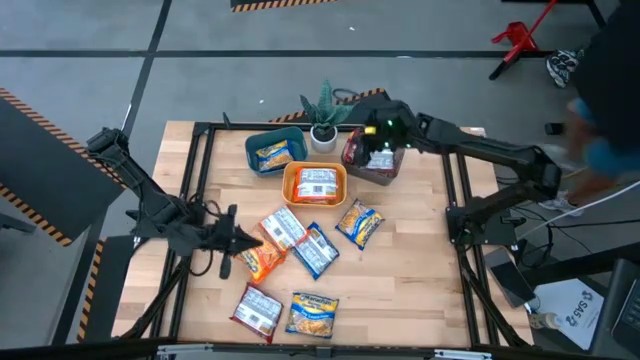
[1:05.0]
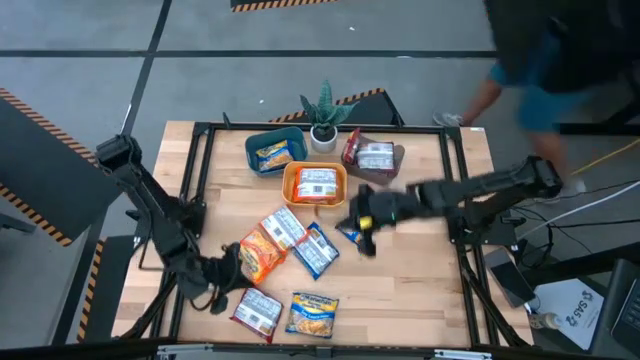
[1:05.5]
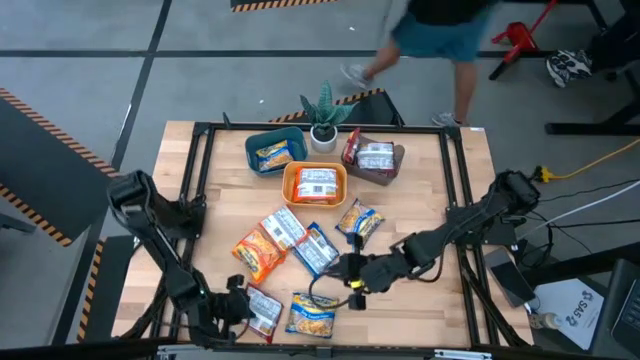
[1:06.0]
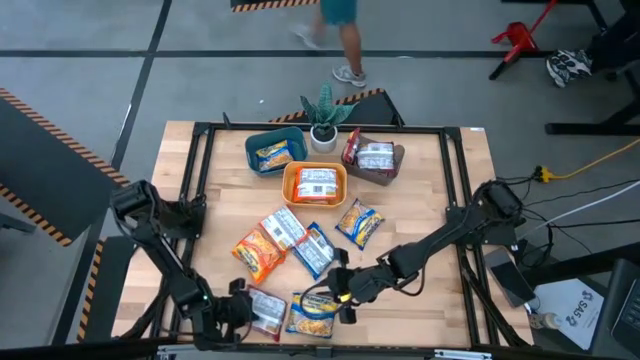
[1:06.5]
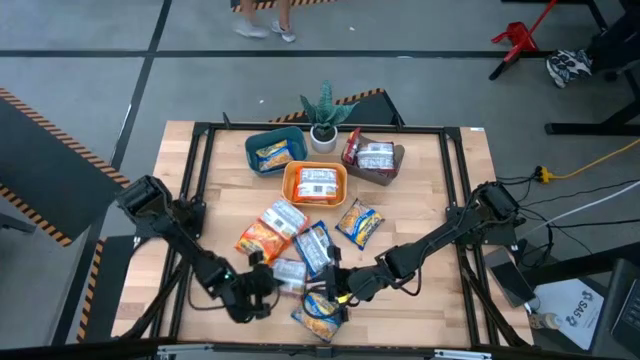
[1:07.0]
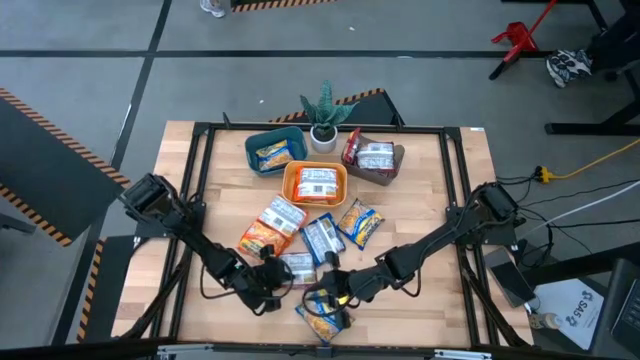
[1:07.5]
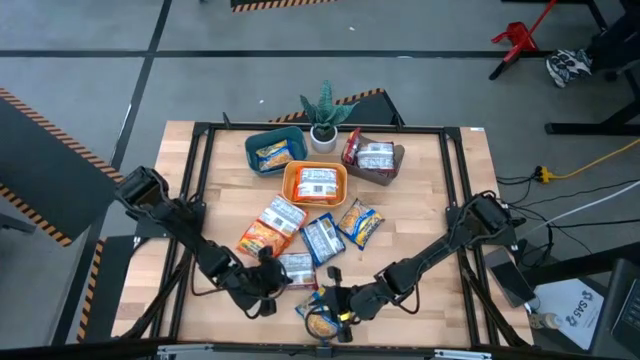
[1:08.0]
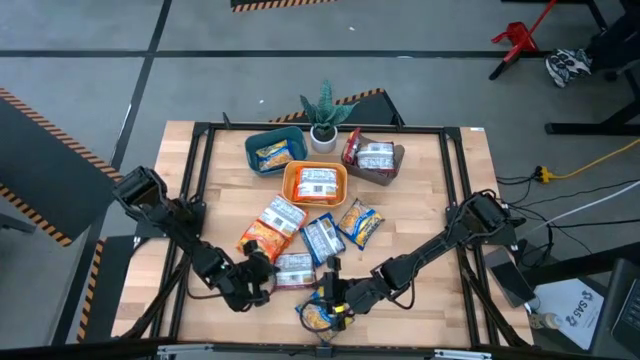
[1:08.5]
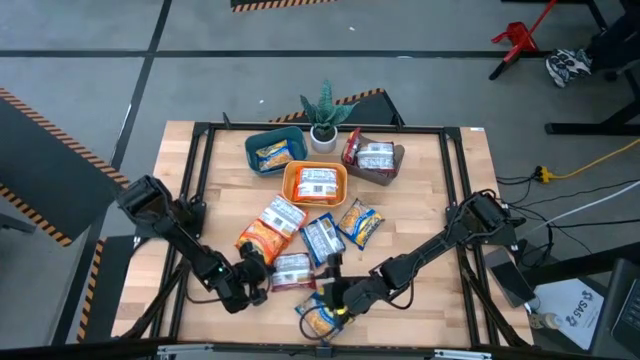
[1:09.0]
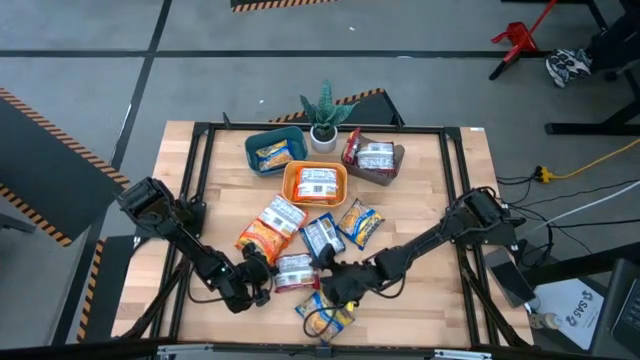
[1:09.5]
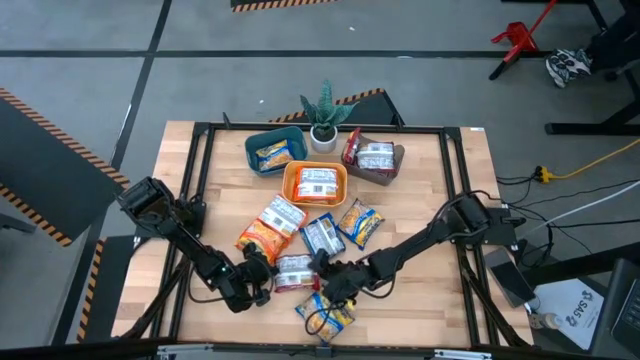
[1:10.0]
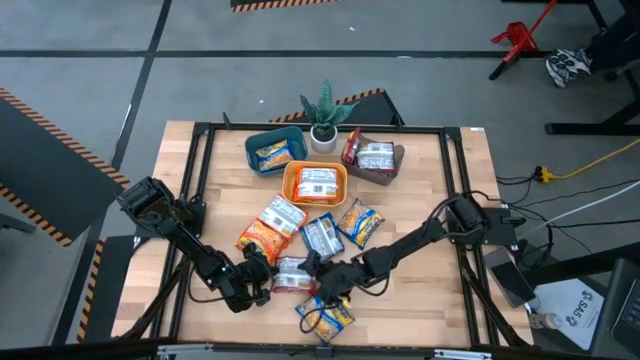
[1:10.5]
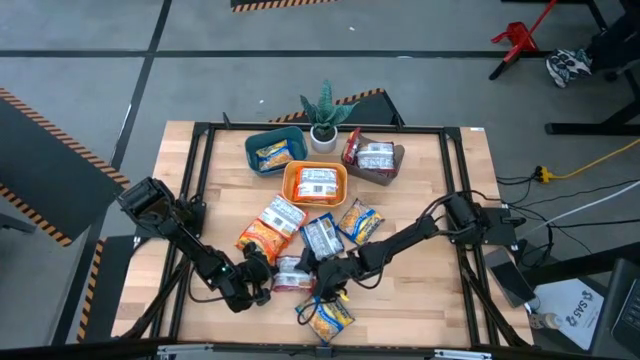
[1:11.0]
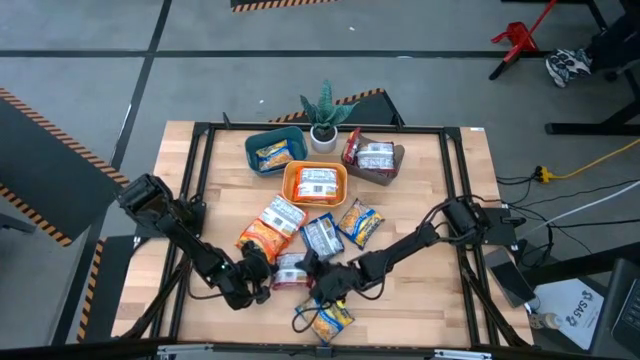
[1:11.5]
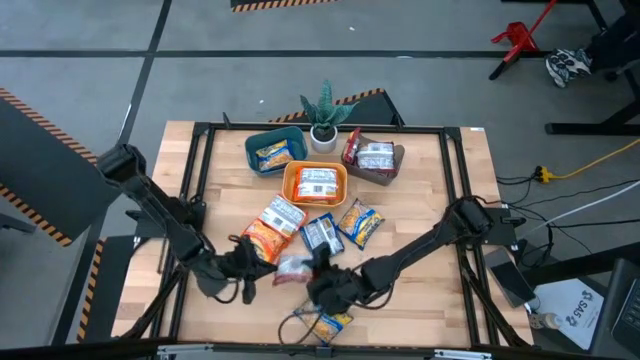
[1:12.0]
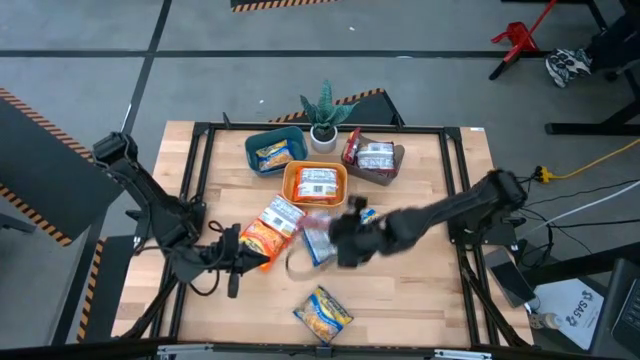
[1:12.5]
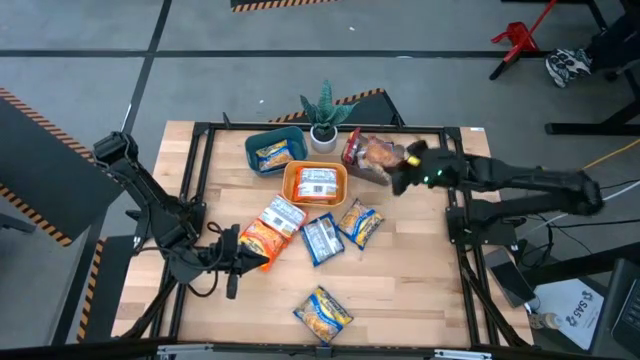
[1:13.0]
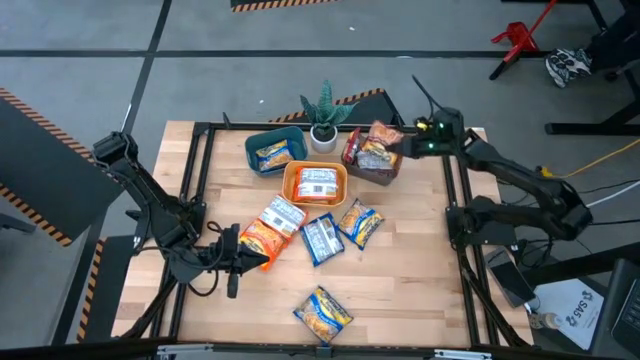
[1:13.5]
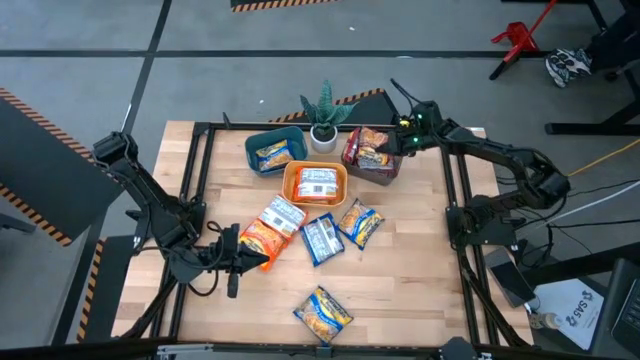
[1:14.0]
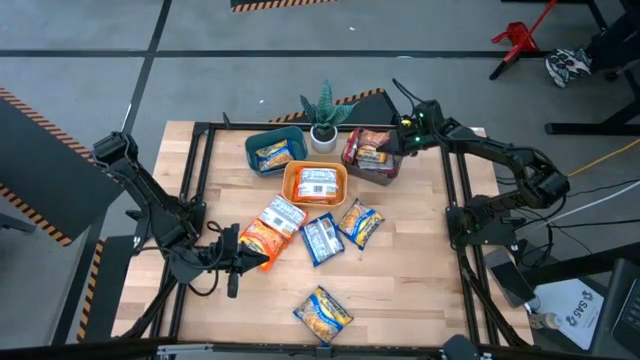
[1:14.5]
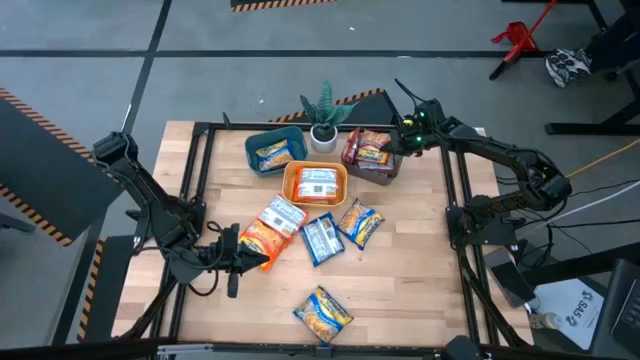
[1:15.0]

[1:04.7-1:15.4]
Task: Sort Maruchan noodles
Put the red noodle pack into the black bin

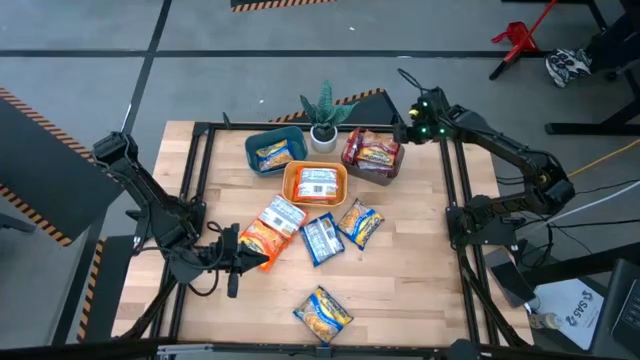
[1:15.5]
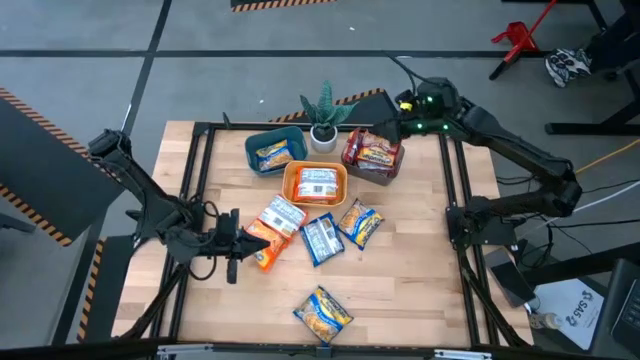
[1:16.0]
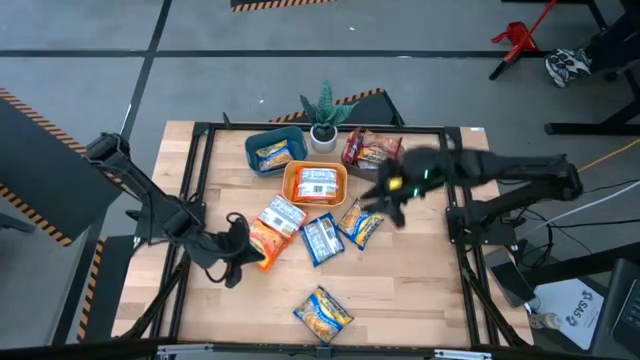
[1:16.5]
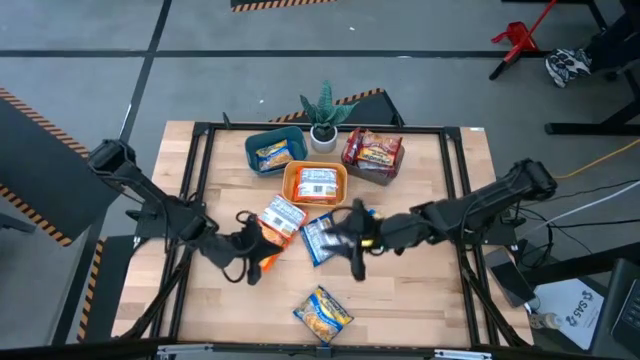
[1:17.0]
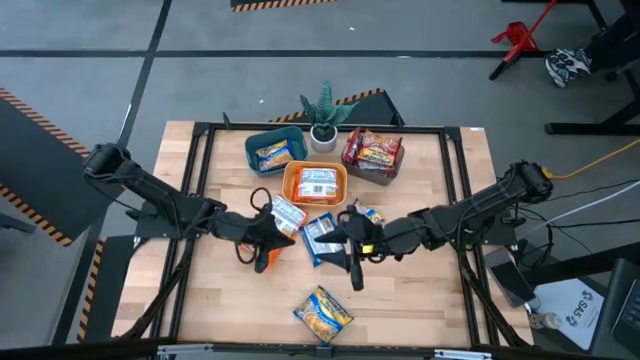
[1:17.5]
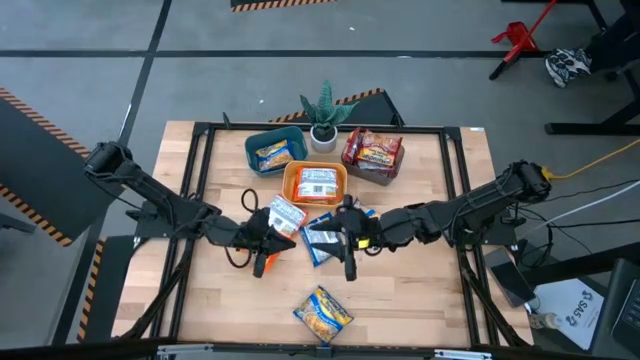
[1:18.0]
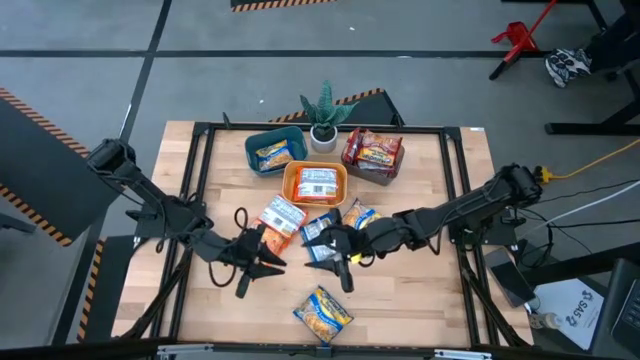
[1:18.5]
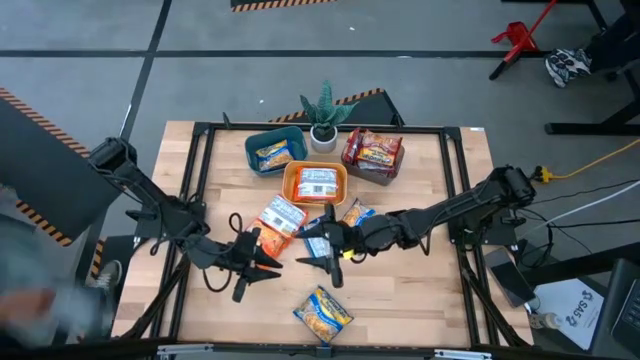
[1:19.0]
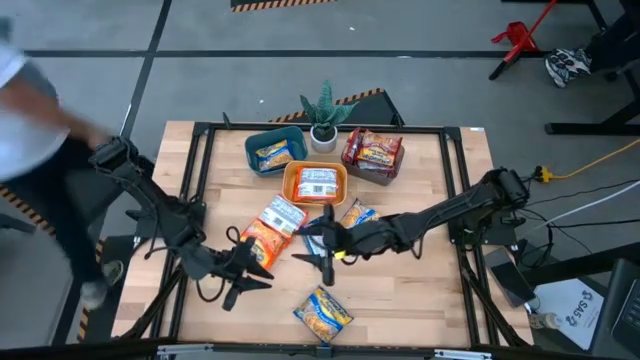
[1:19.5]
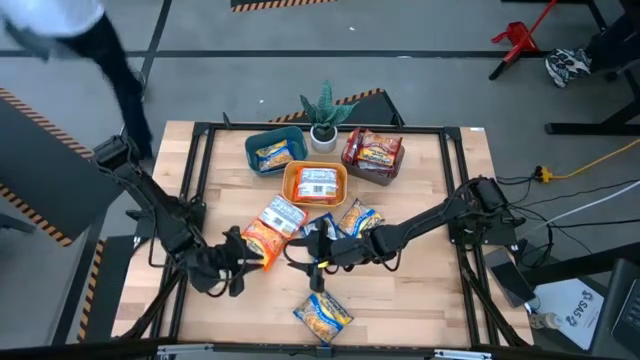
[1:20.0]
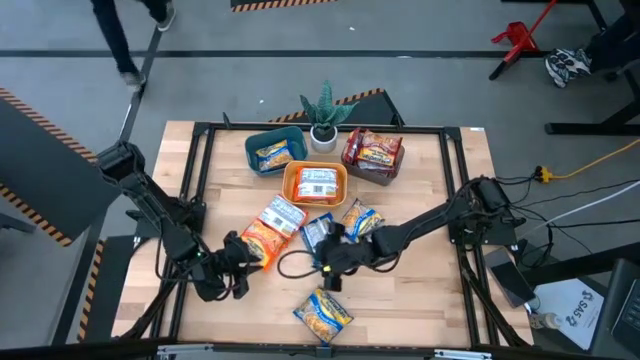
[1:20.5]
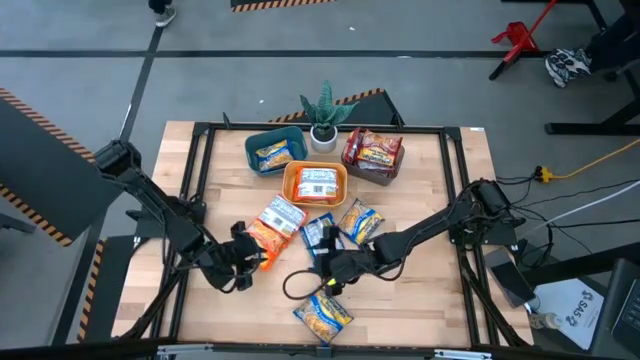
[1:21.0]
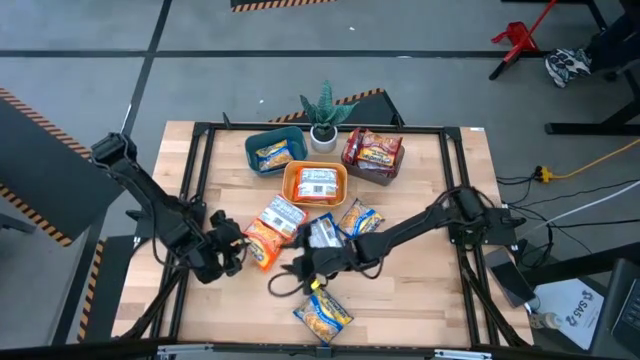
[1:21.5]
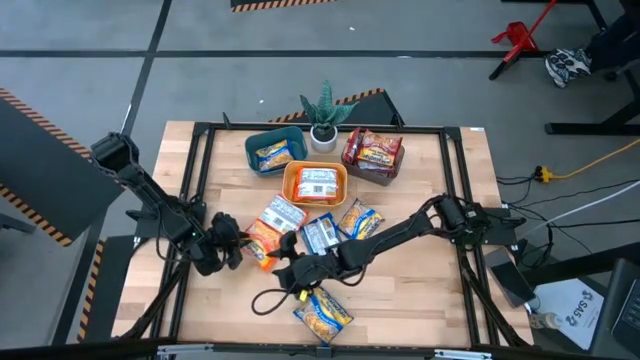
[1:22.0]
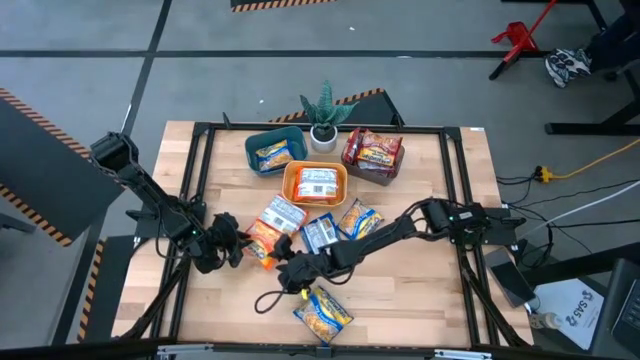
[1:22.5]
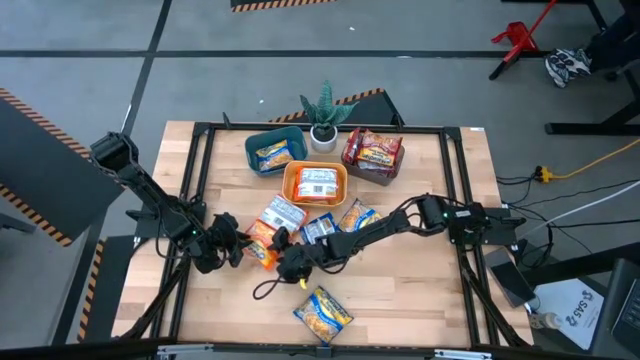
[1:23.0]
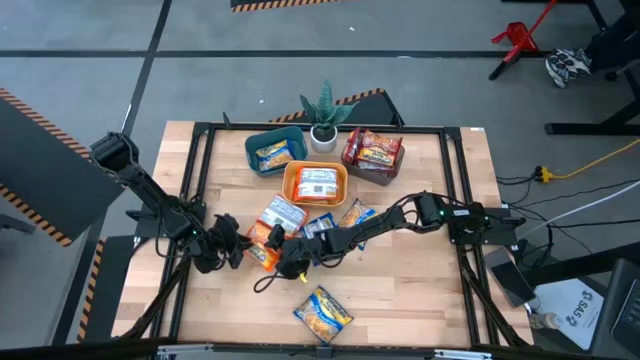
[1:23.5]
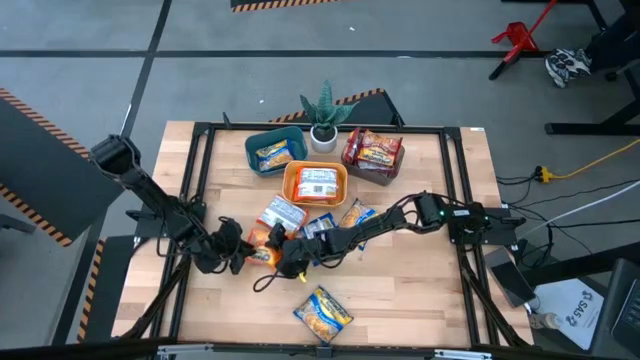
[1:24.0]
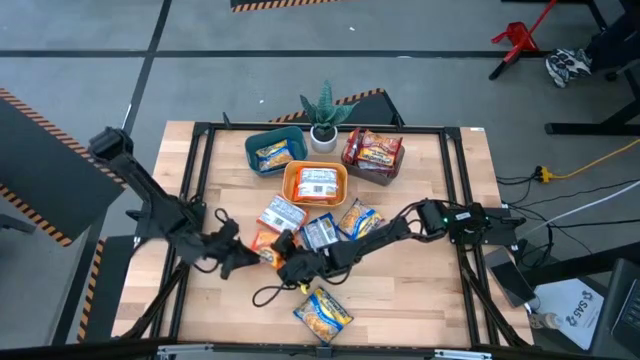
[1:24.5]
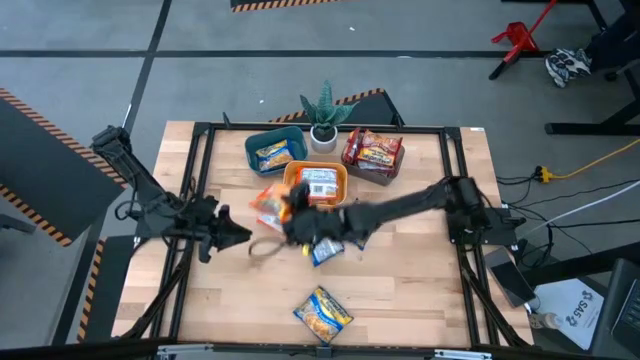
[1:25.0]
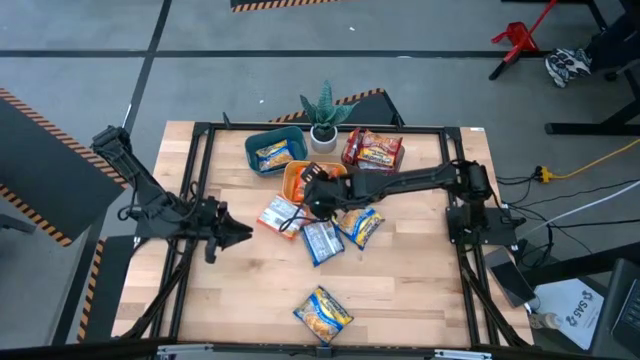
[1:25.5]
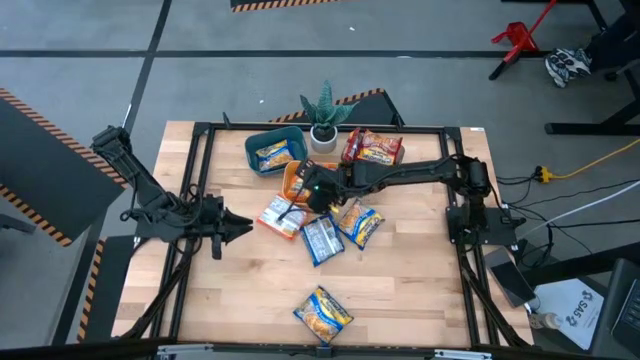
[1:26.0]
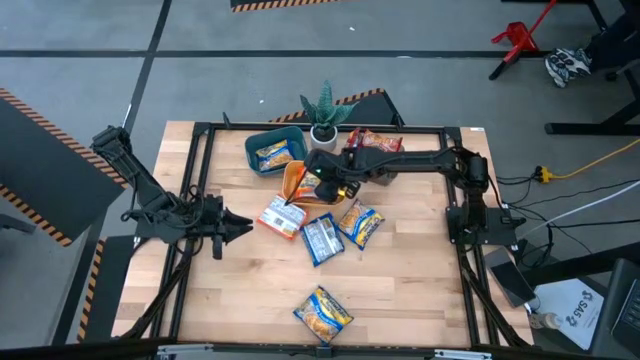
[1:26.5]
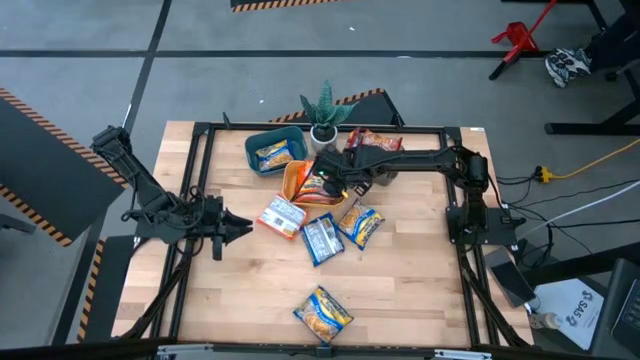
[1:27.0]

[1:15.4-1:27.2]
Put the bottom orange noodle pack into the yellow bin
